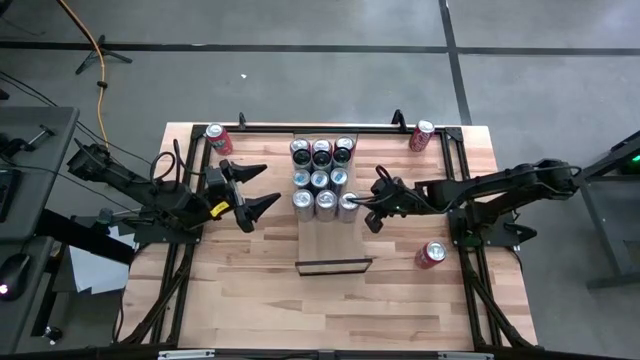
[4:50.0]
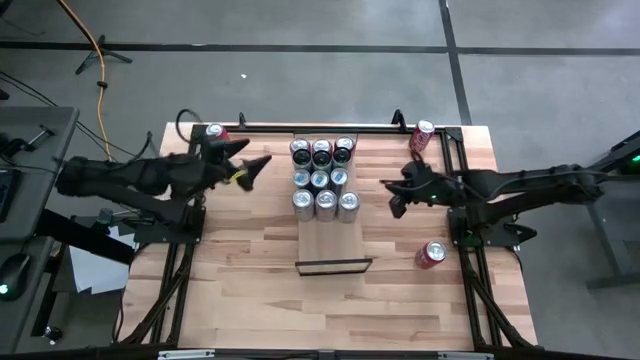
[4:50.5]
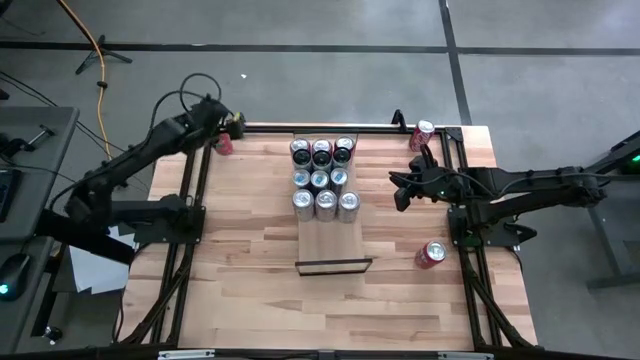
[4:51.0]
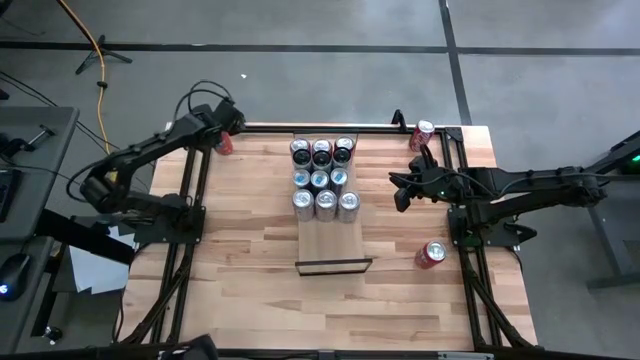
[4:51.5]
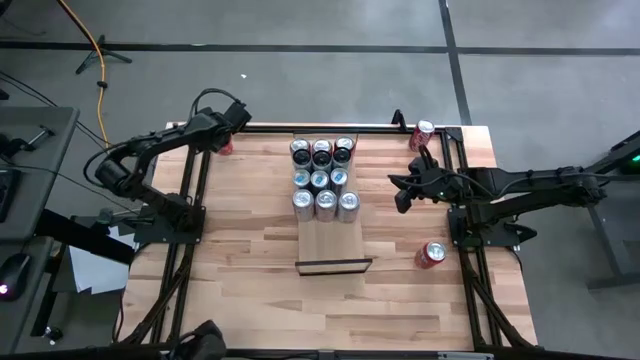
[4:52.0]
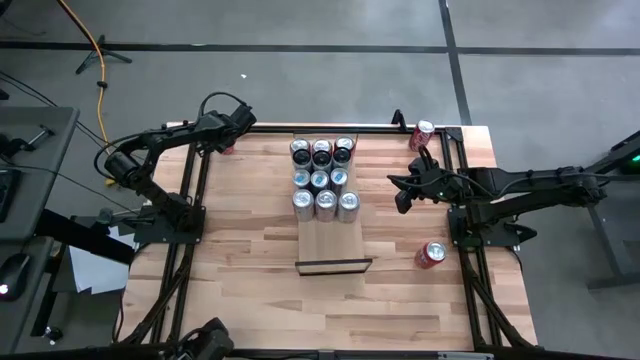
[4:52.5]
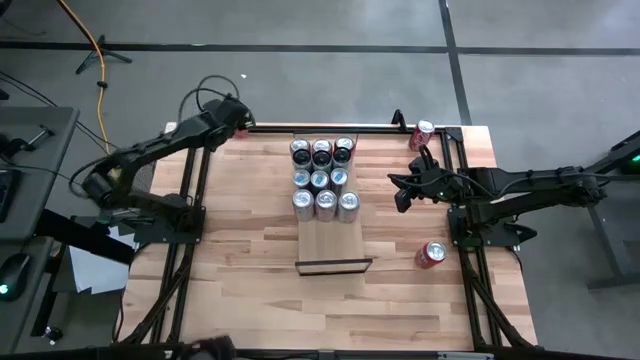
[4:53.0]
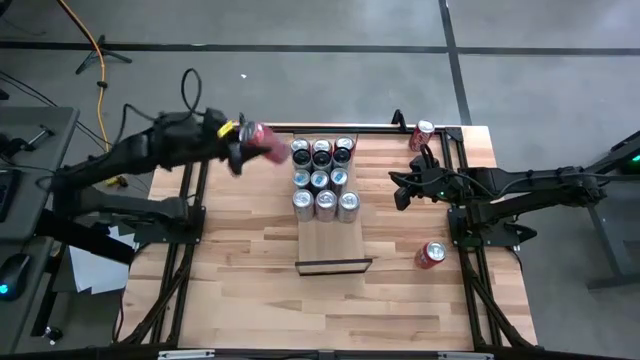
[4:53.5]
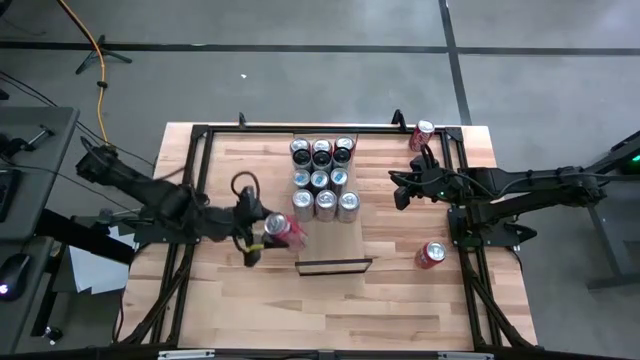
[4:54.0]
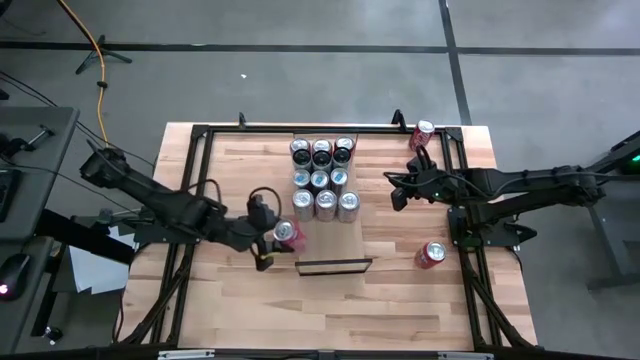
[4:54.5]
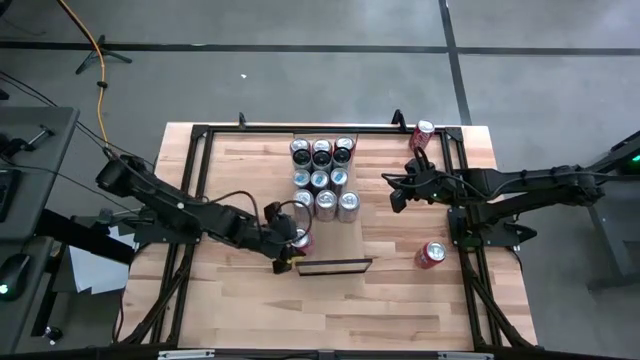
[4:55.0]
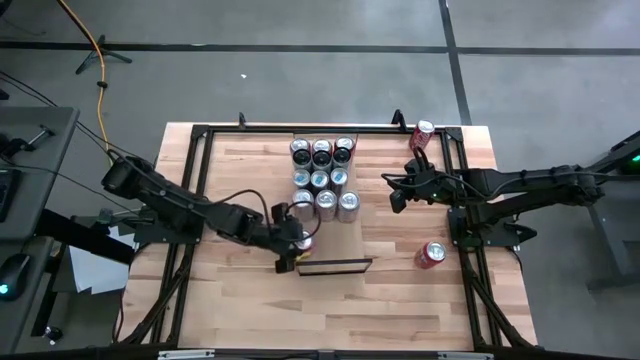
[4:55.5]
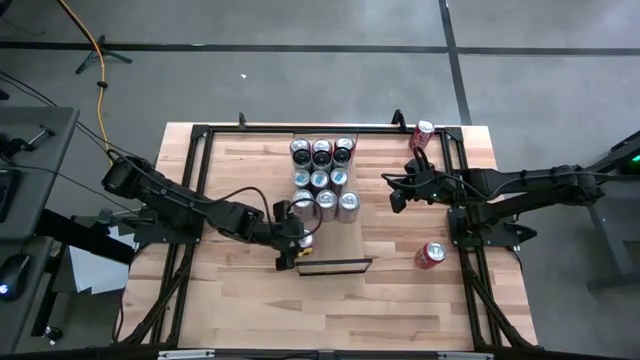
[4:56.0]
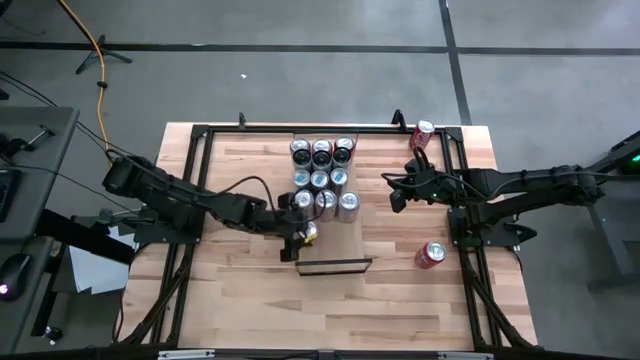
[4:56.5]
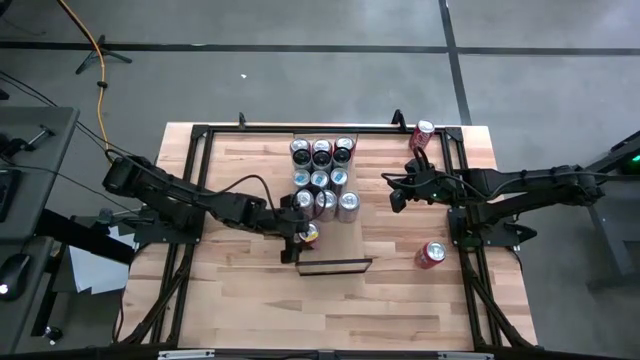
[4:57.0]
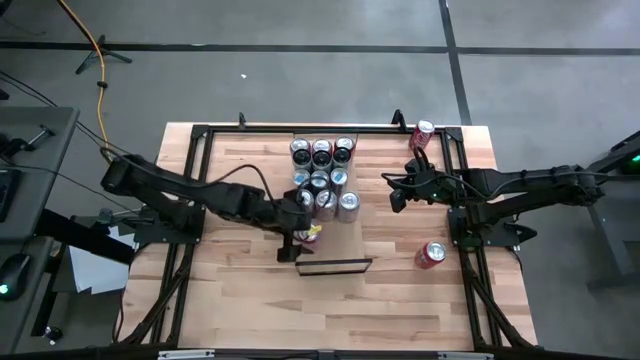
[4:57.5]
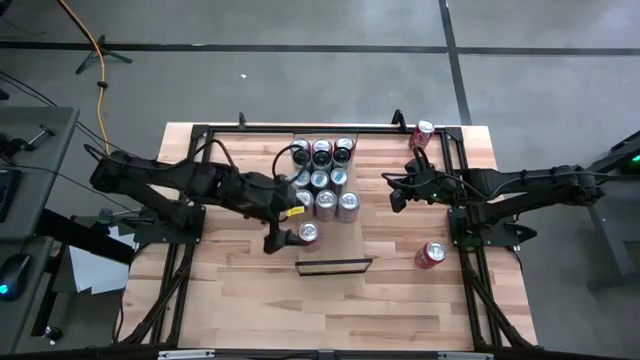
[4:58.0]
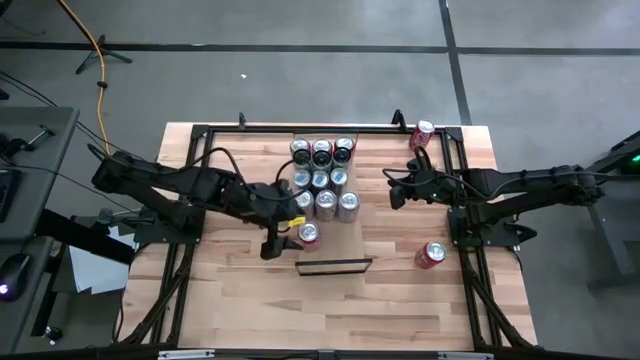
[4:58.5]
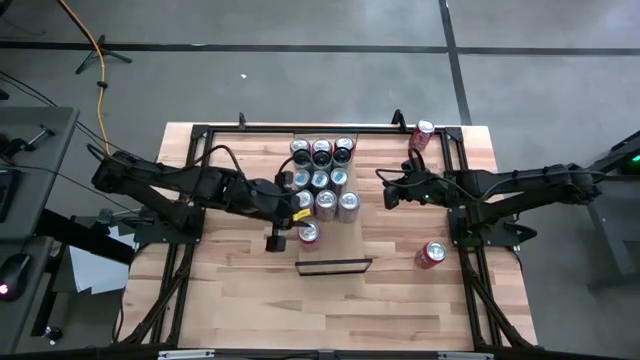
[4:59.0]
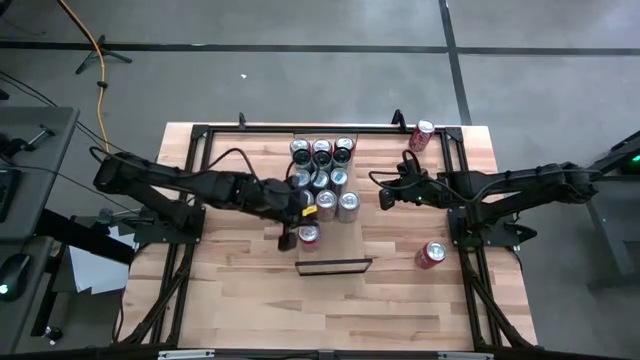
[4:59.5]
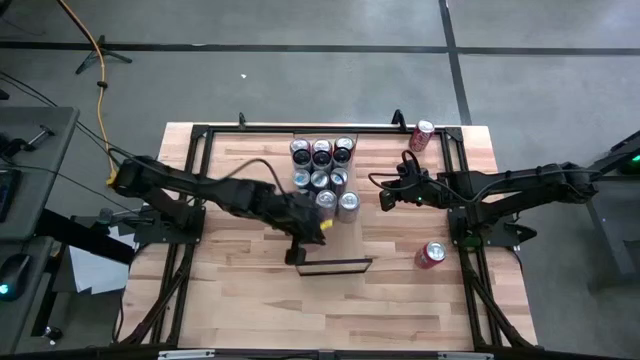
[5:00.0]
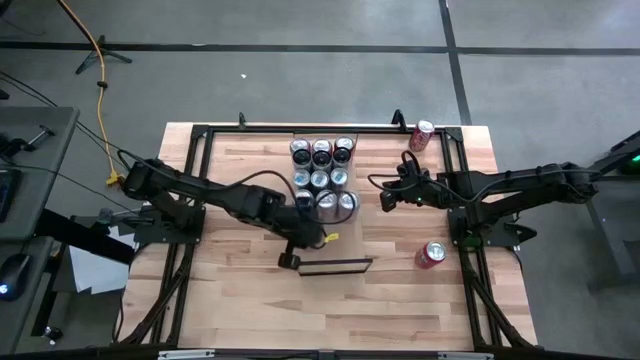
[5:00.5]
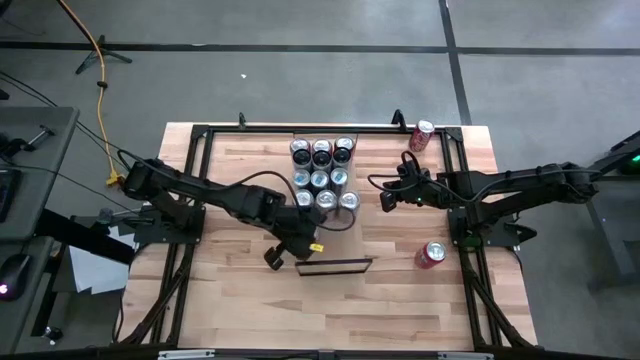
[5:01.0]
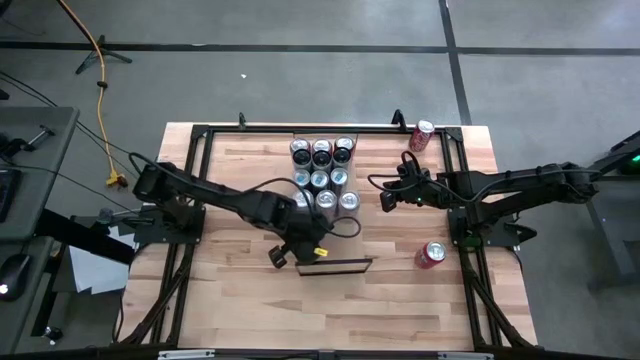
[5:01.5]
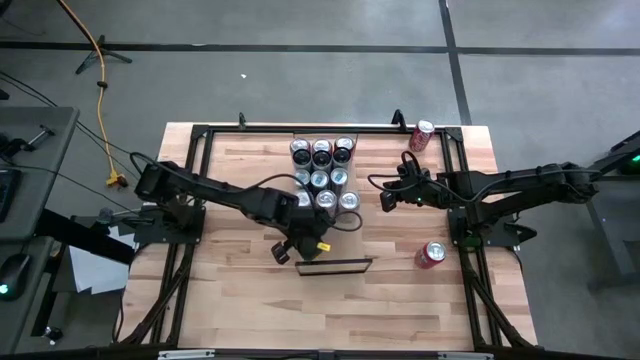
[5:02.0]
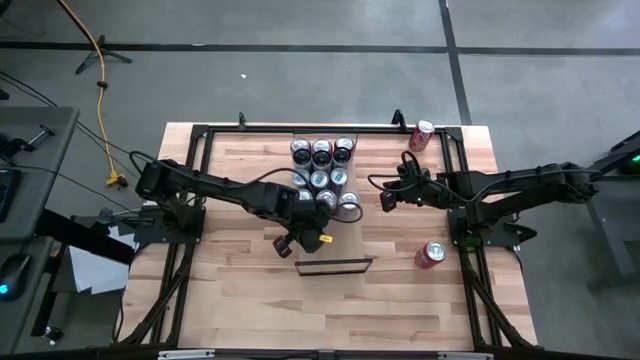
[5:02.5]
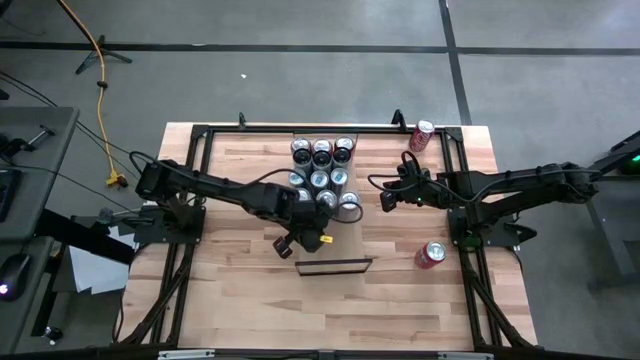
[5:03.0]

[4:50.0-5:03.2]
Task: Place canned beverage on shelf
Put the red soda can on the shelf

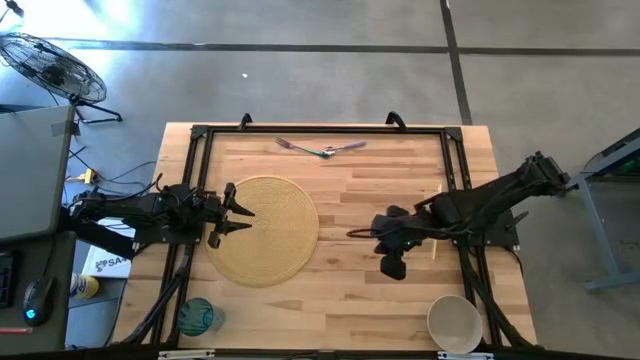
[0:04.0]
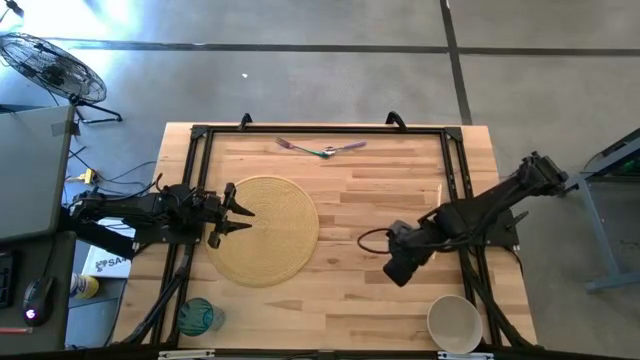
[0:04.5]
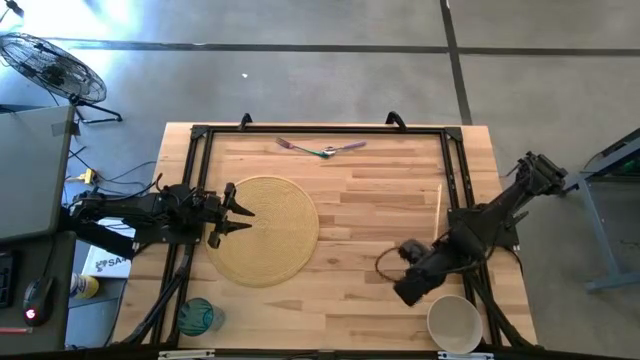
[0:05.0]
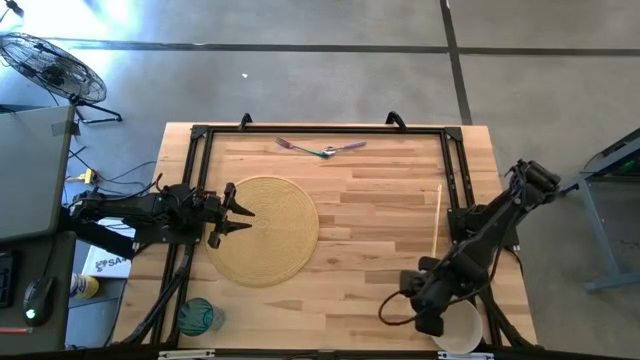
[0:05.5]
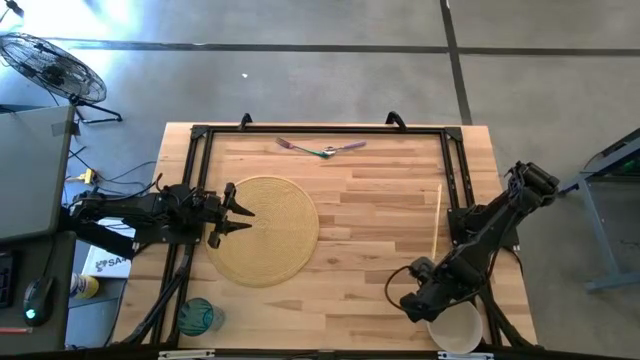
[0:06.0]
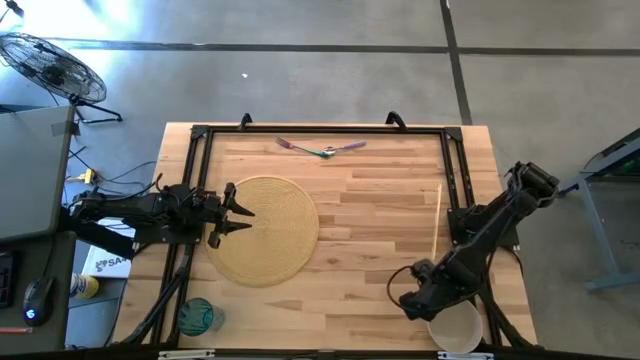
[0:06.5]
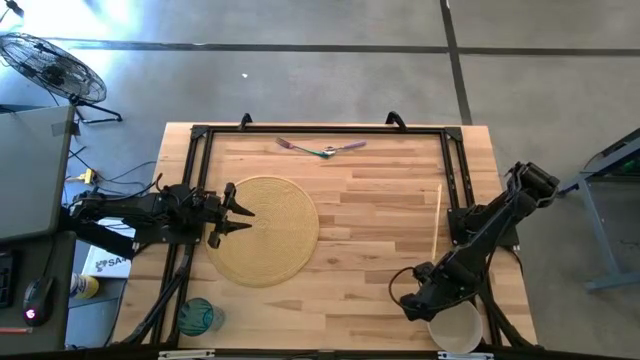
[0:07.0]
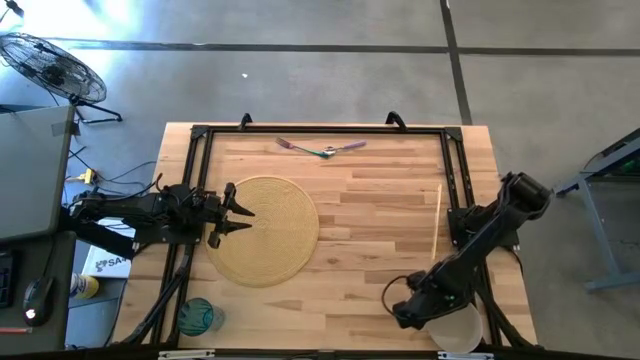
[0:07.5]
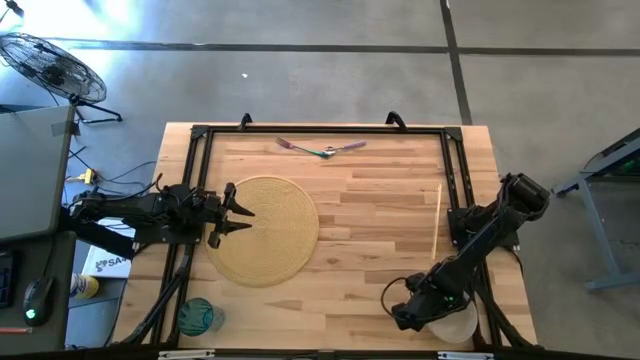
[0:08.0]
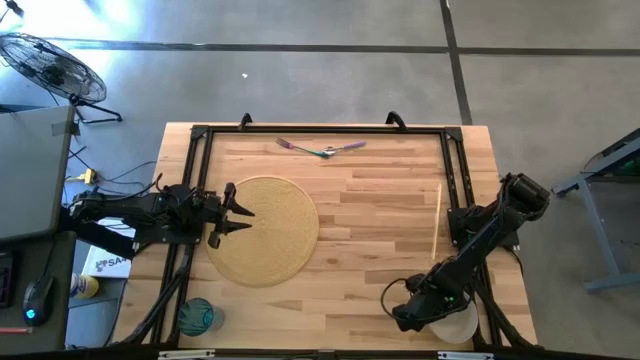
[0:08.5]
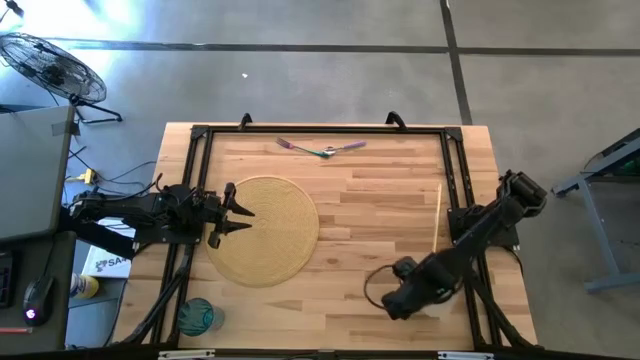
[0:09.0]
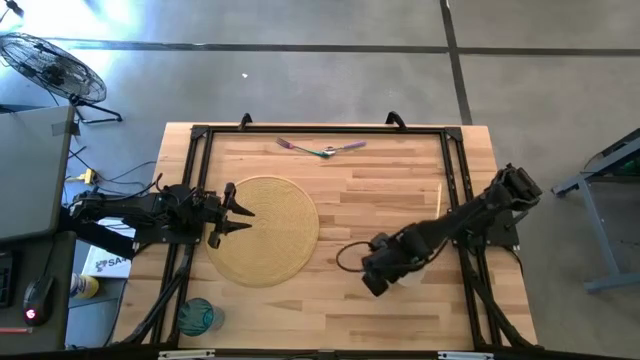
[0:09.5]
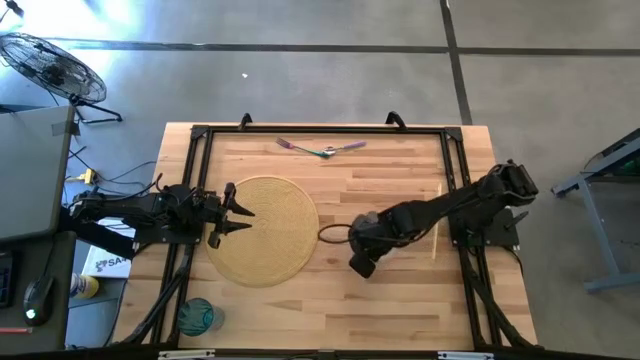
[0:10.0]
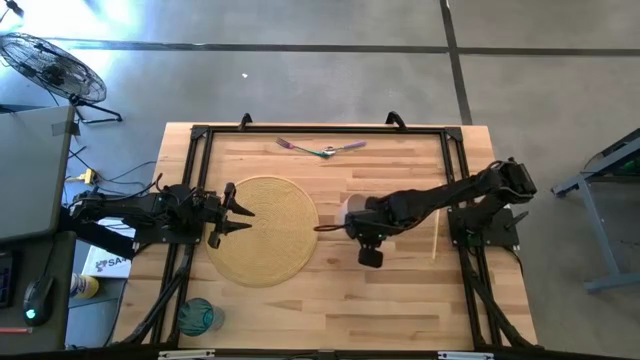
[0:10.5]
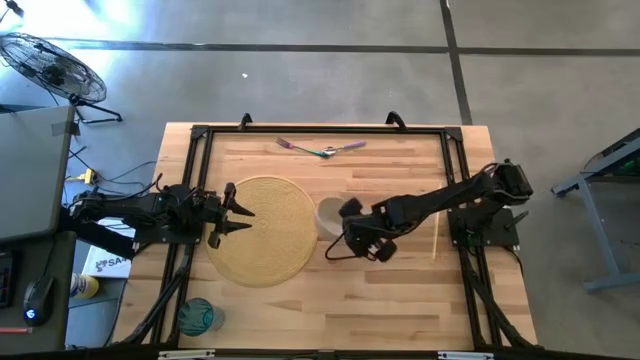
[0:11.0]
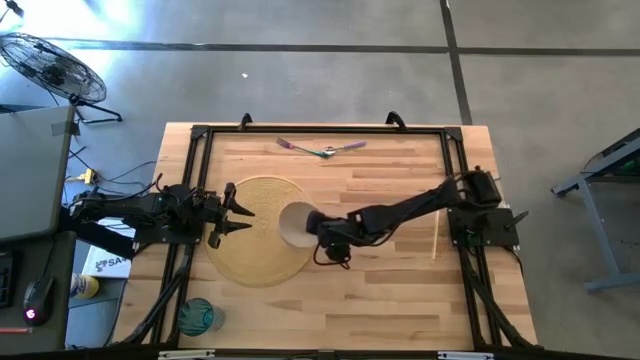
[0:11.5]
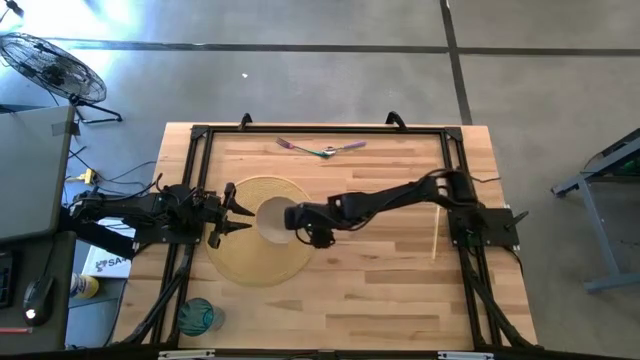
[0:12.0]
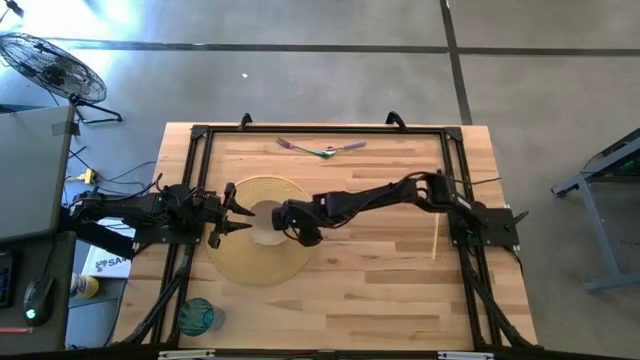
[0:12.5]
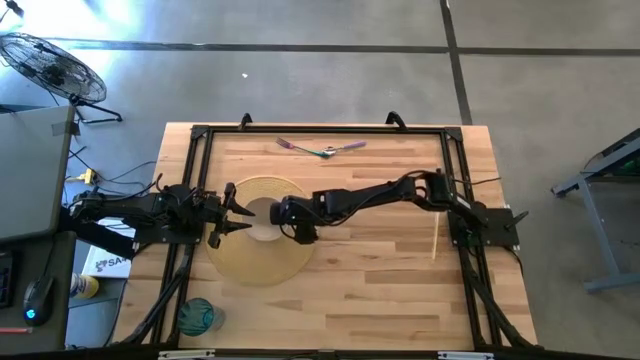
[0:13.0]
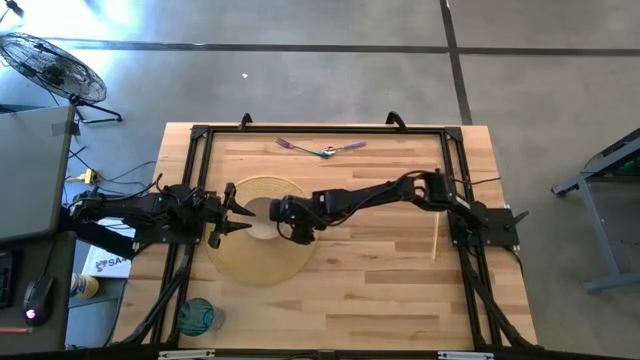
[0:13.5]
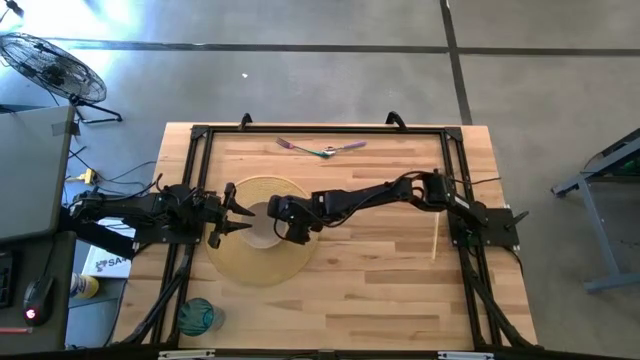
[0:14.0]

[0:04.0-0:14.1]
Task: Pick & Place Utensil
Put the white bowl on the brown mat
